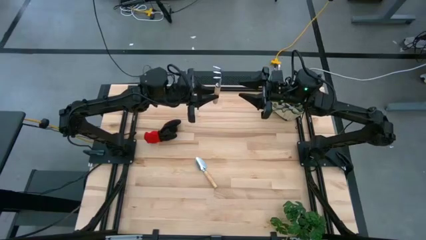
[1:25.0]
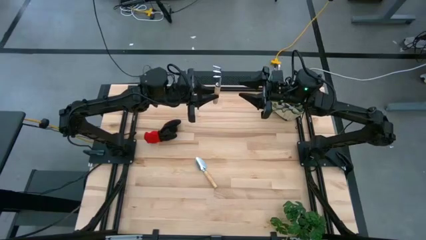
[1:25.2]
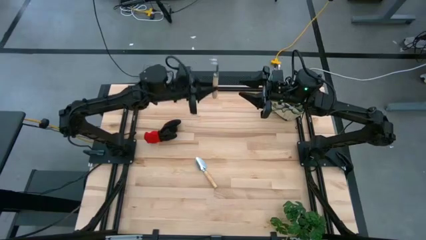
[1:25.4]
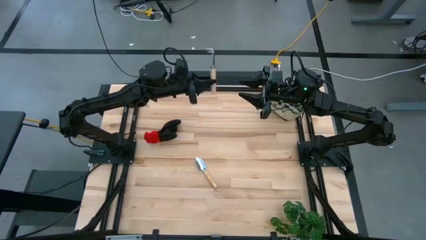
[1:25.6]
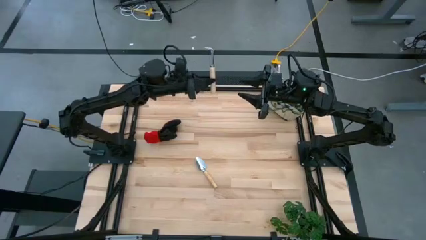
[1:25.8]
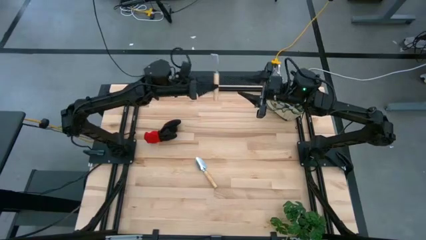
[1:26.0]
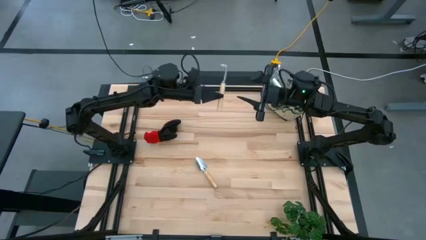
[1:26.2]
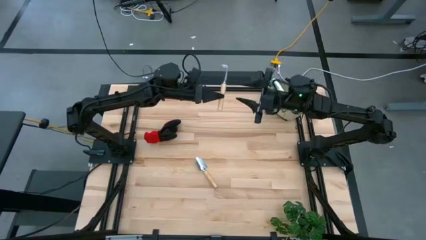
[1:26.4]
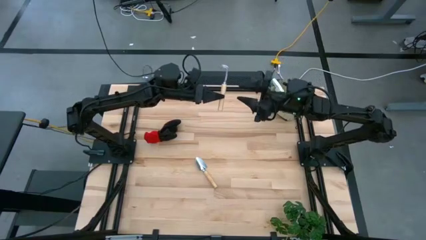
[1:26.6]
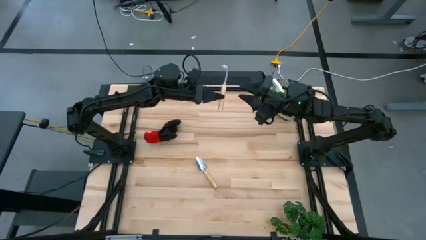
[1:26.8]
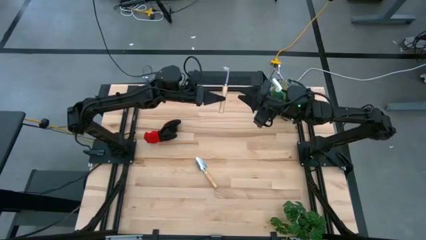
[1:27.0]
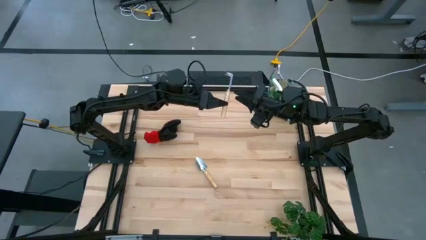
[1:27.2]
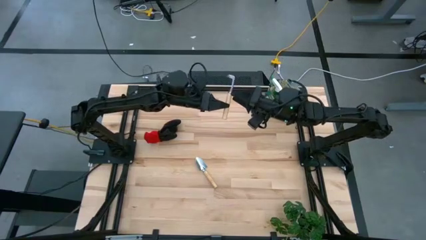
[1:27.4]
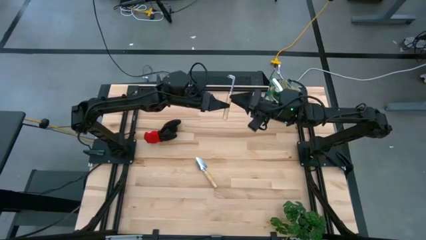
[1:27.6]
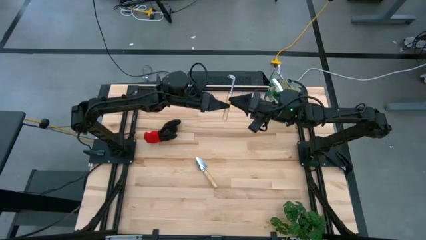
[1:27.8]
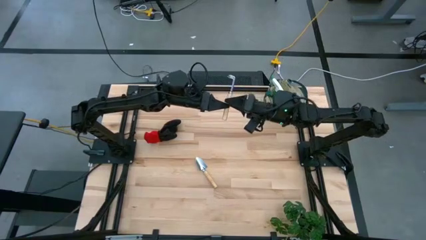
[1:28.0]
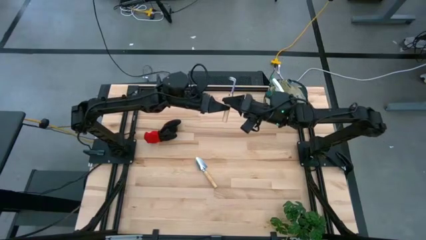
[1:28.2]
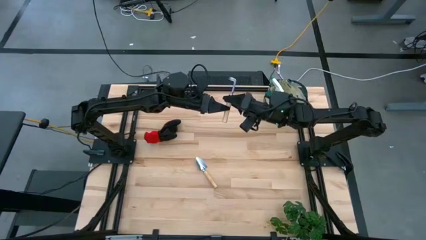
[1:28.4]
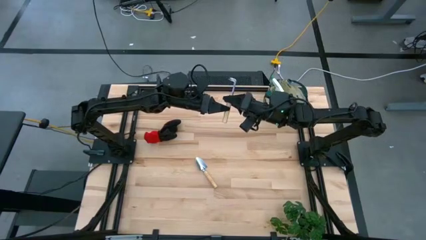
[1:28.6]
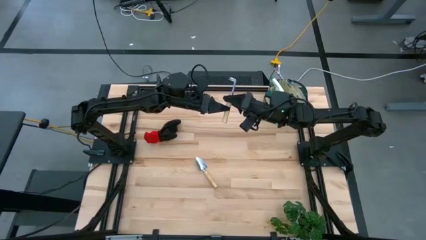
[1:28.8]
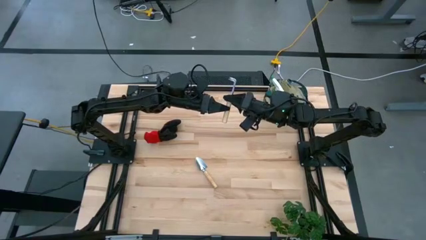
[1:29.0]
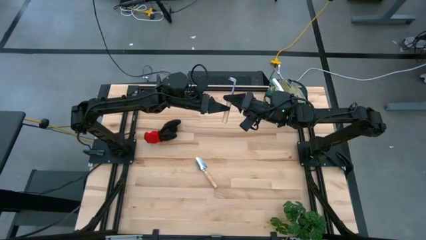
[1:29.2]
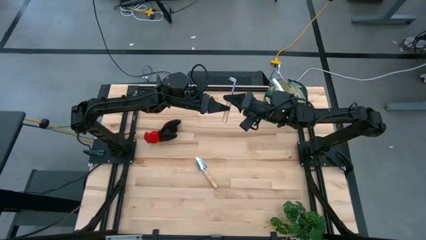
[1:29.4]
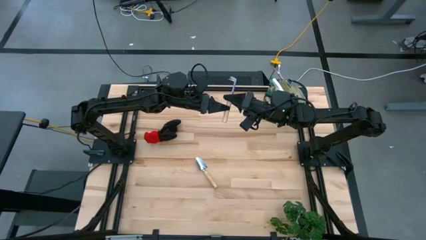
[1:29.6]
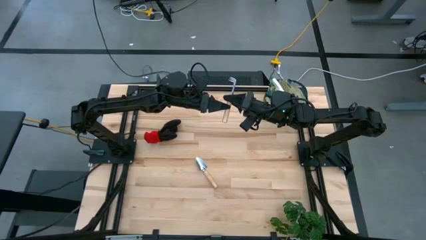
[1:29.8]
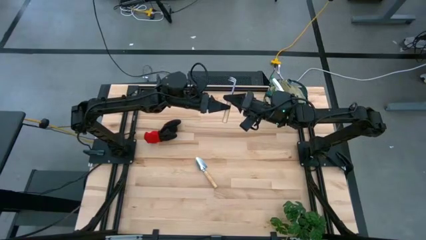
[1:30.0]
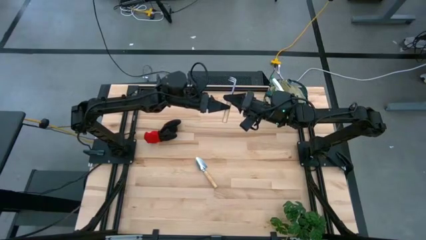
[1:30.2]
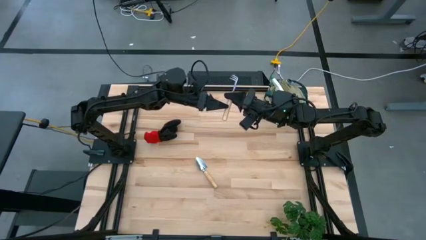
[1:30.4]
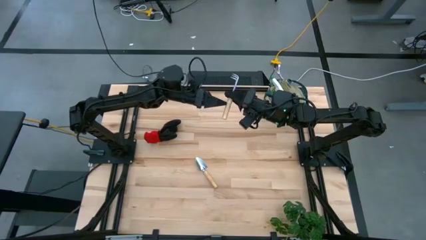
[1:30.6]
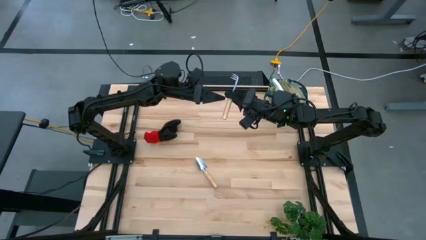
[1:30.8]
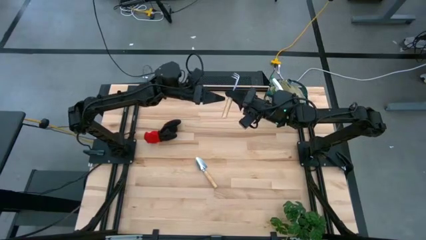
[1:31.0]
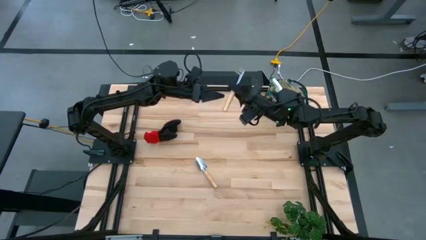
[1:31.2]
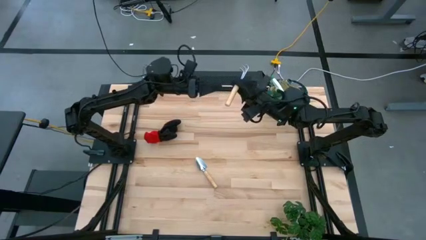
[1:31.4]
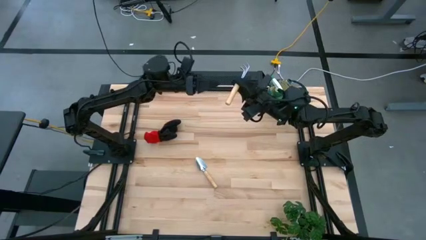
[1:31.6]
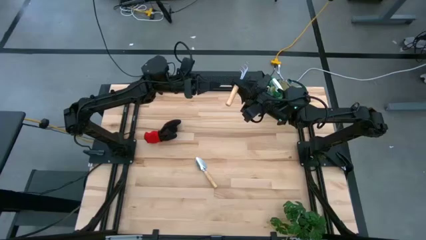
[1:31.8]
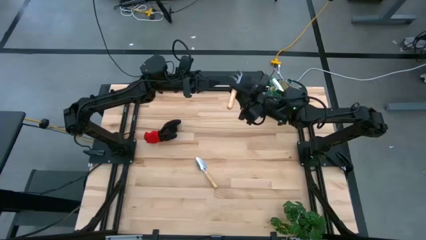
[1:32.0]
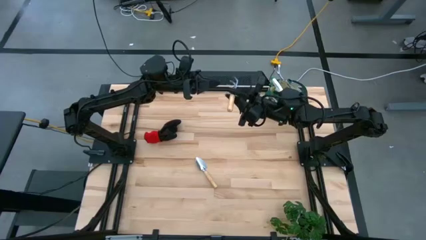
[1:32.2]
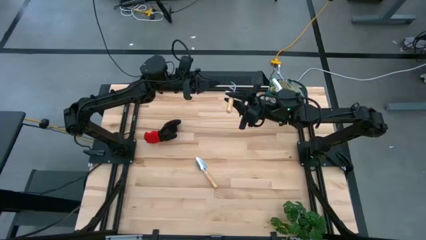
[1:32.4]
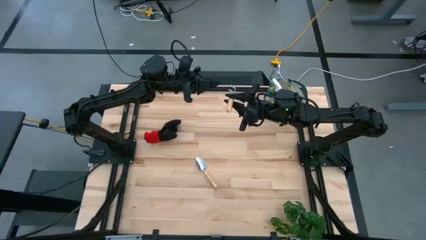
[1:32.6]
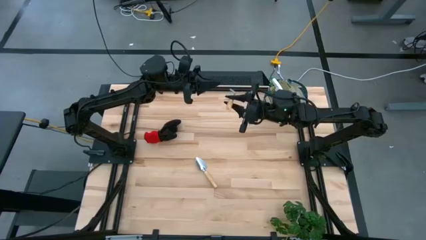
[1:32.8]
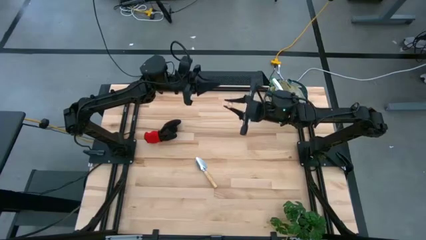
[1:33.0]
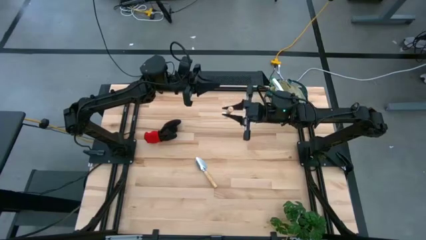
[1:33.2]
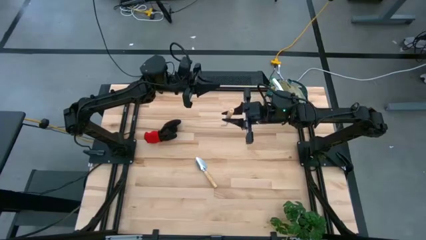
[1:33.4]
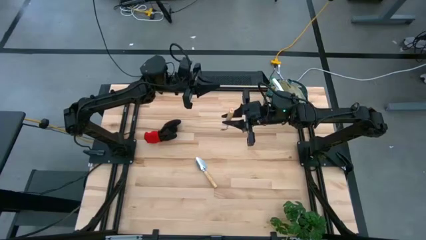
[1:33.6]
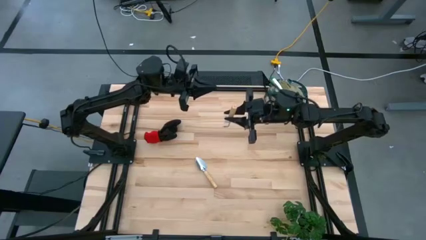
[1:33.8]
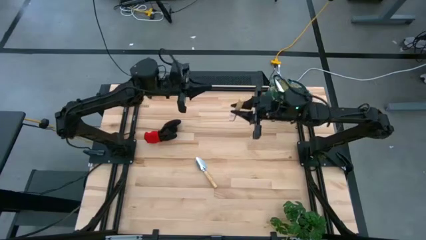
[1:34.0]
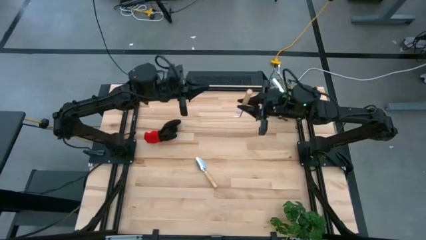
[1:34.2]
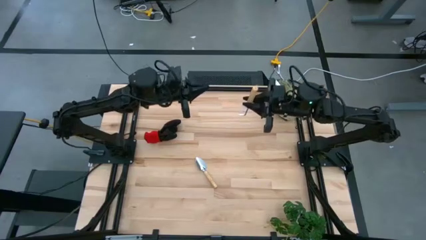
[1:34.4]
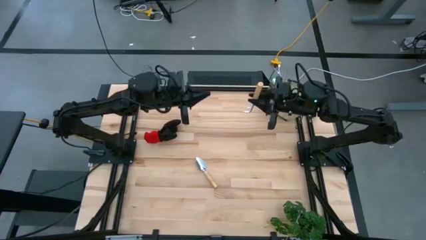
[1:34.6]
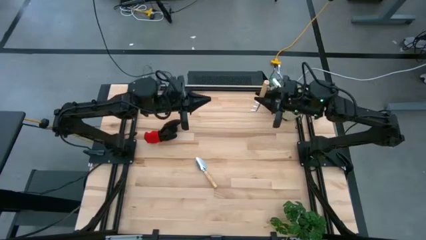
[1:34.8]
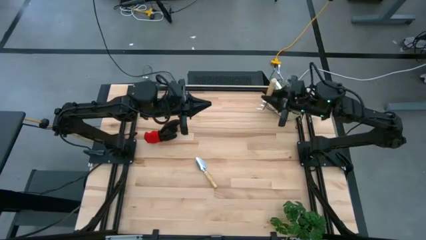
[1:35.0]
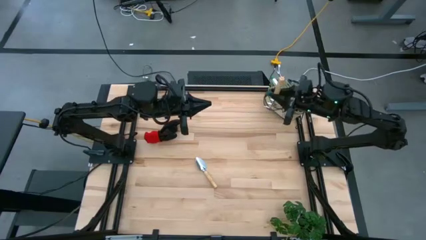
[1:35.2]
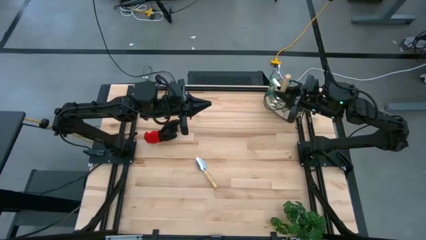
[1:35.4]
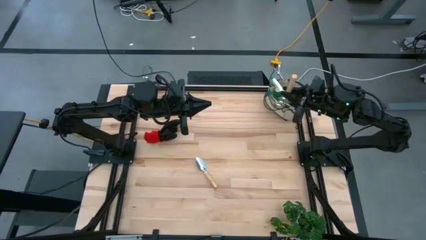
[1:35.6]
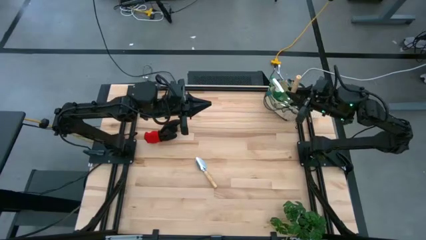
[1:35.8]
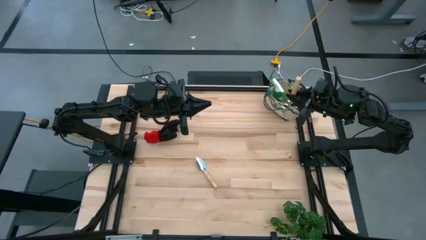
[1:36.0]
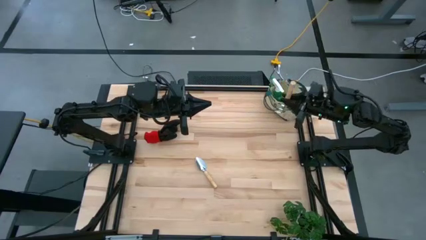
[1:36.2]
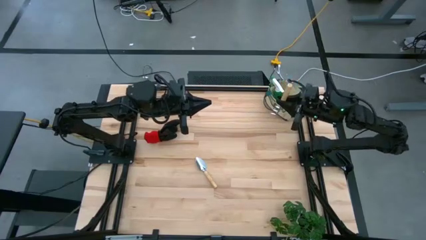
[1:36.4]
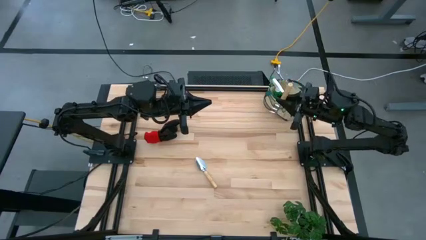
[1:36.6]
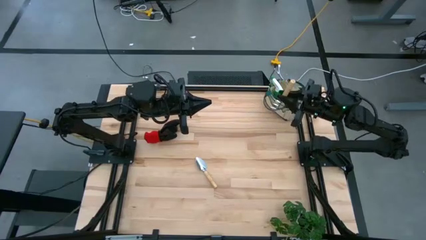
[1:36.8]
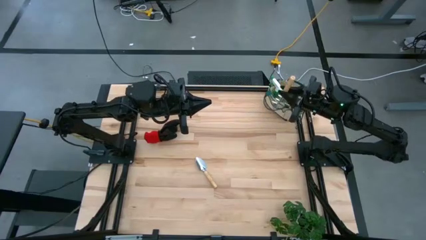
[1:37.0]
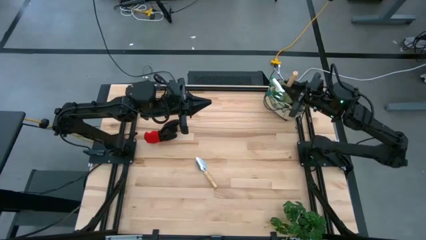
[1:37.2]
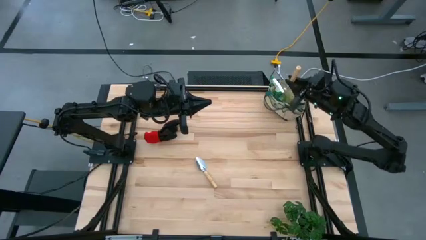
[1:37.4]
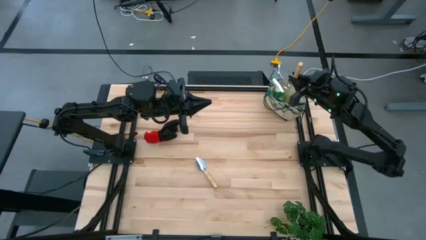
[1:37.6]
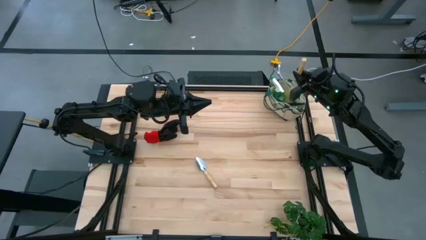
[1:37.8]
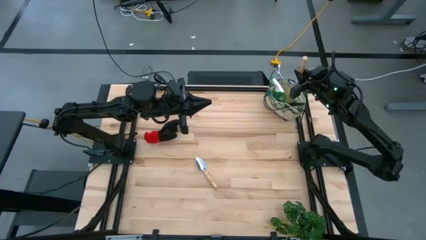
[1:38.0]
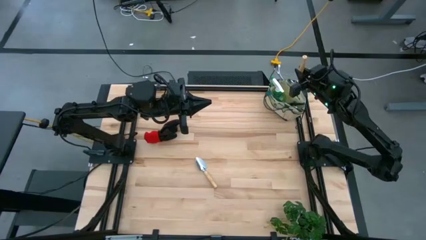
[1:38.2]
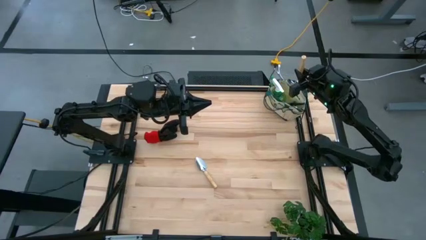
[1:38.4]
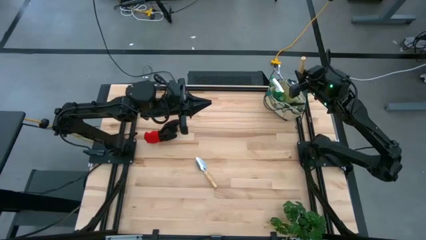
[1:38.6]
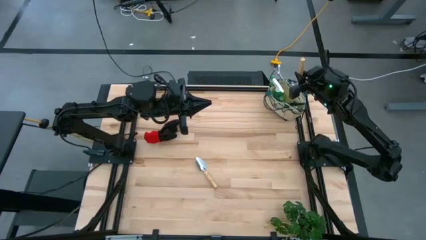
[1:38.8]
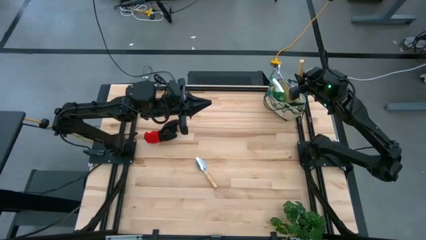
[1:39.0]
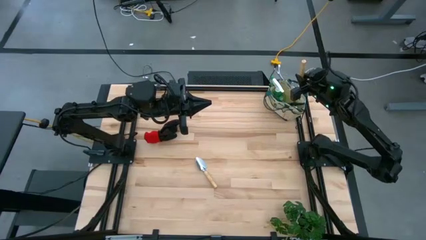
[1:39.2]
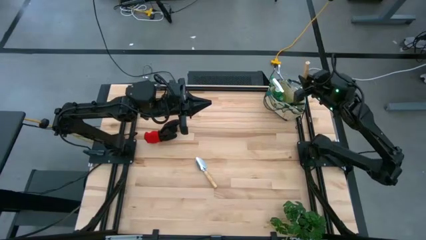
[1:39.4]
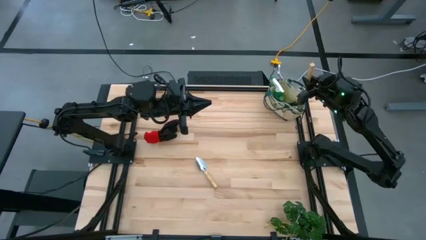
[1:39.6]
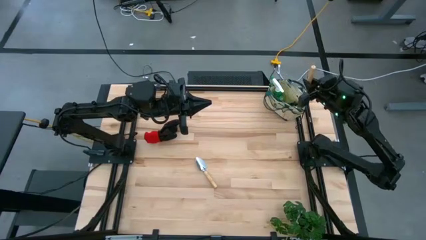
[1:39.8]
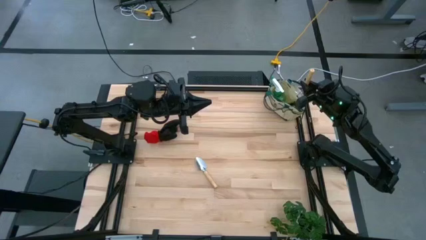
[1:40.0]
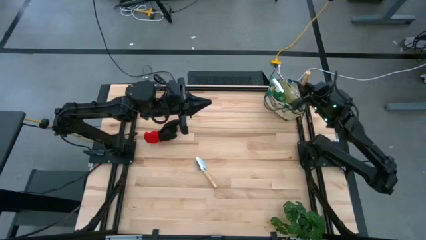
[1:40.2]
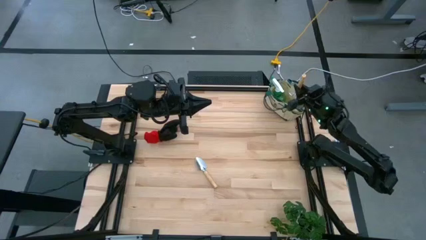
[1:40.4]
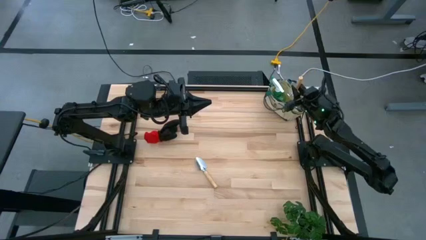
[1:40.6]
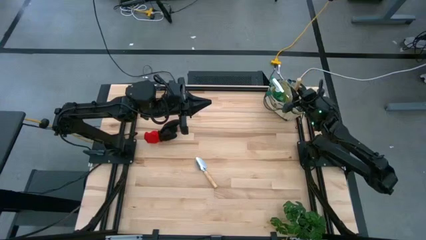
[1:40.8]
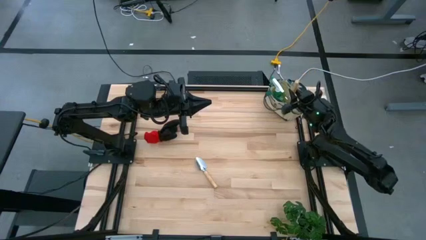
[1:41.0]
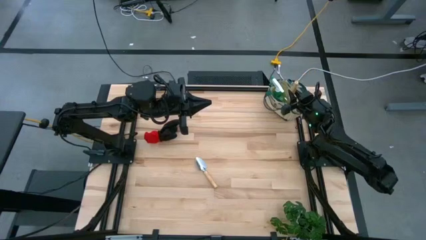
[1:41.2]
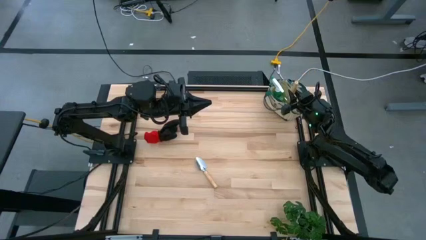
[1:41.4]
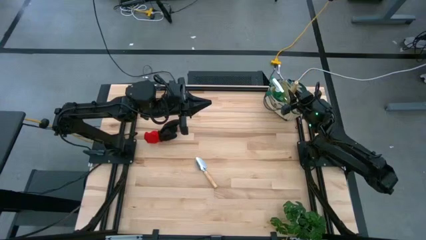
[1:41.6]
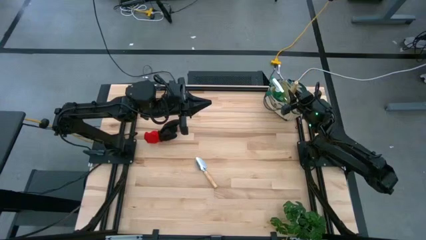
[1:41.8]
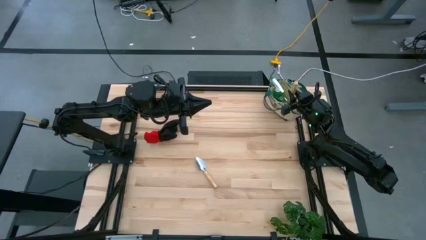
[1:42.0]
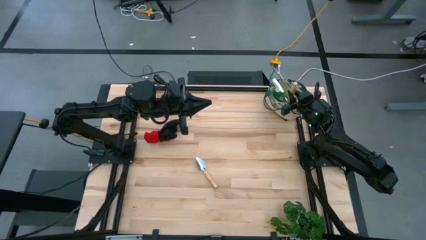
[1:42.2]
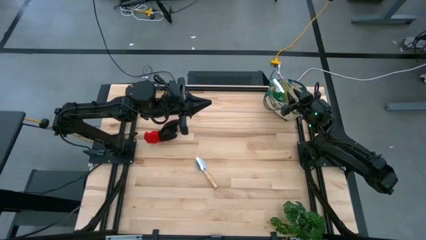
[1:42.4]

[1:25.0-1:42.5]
Task: Pick & Place Garden tools in Gardening bag
Put the hand rake into the gardening bag
